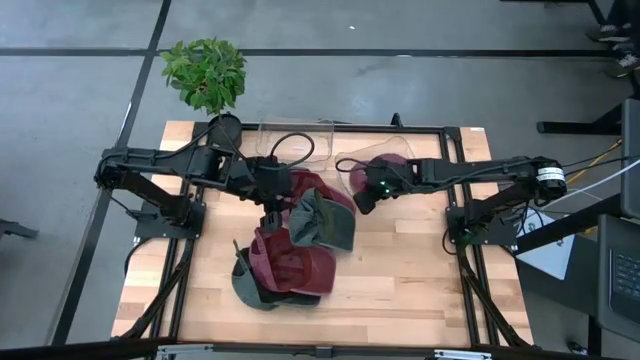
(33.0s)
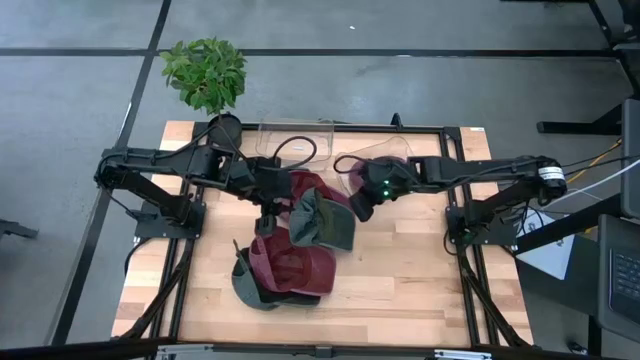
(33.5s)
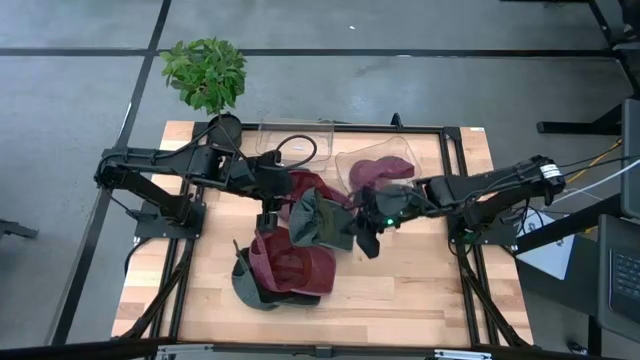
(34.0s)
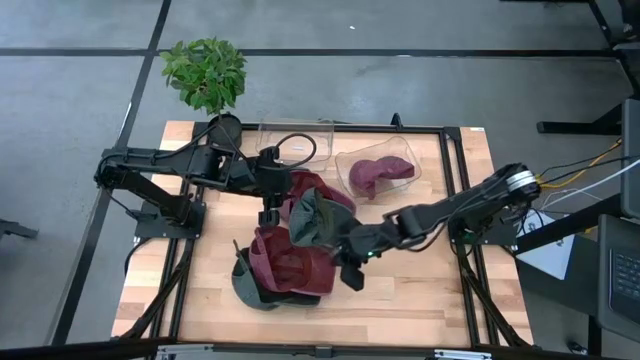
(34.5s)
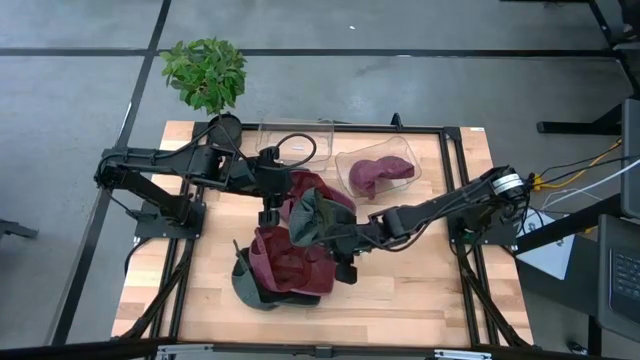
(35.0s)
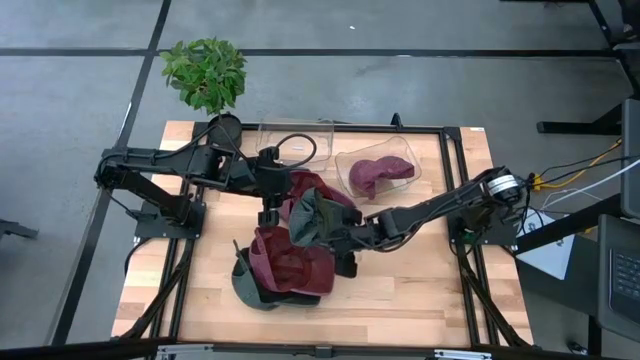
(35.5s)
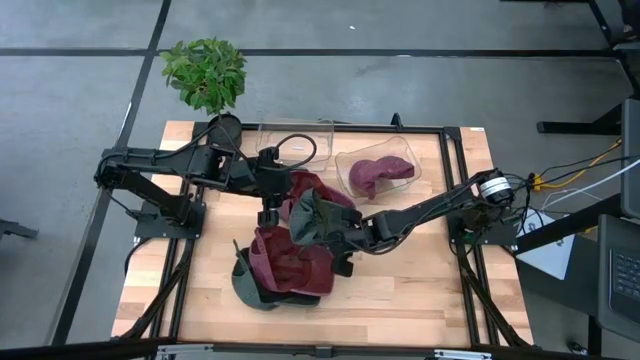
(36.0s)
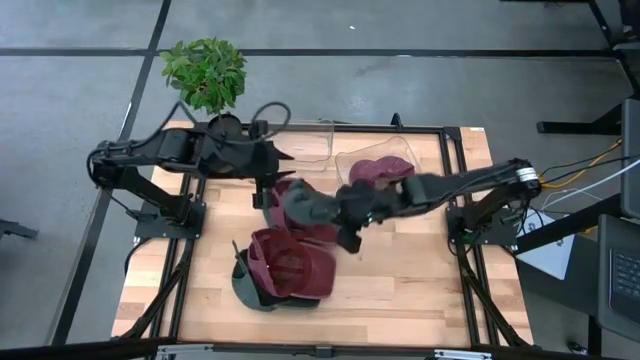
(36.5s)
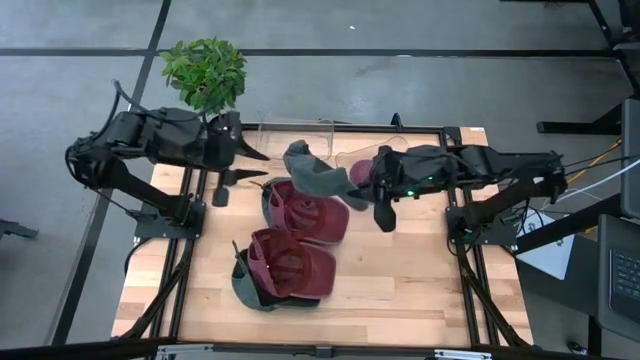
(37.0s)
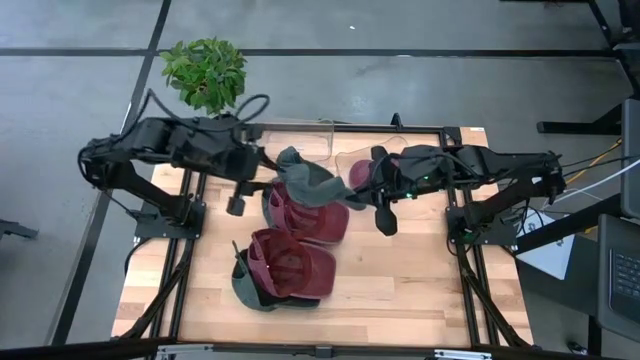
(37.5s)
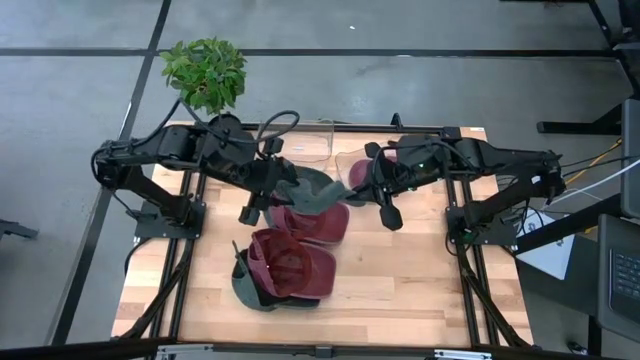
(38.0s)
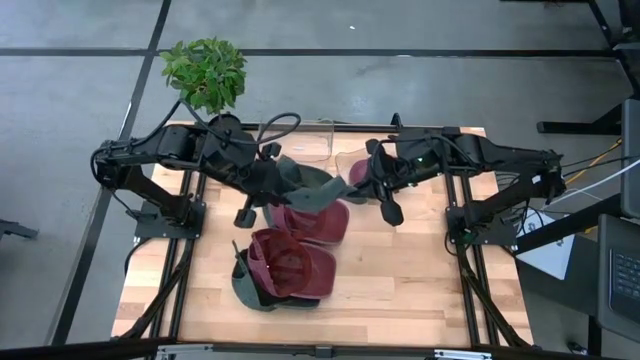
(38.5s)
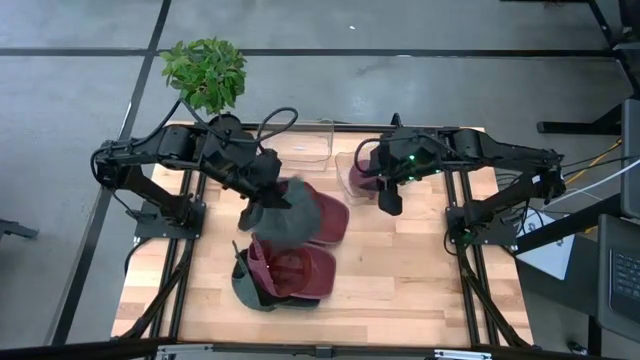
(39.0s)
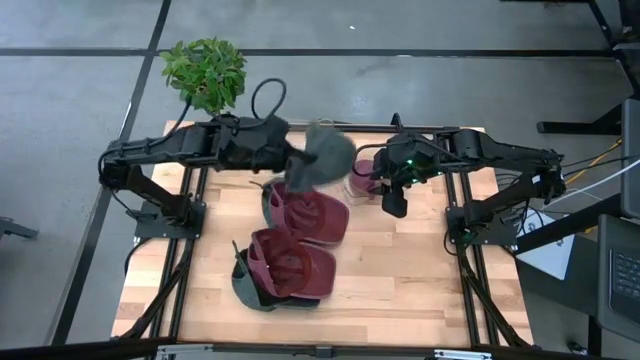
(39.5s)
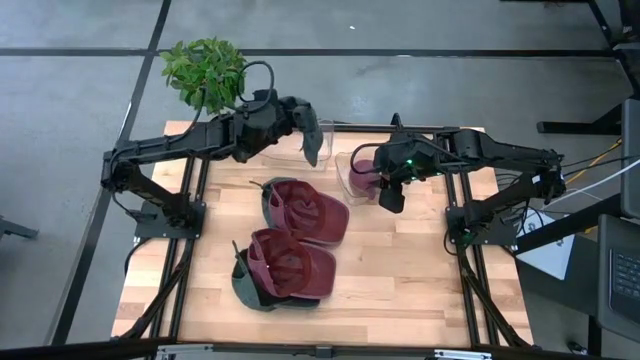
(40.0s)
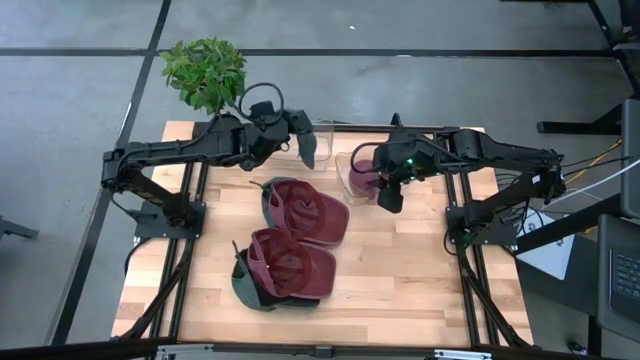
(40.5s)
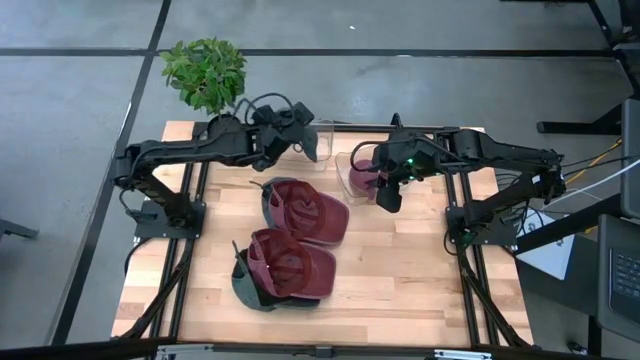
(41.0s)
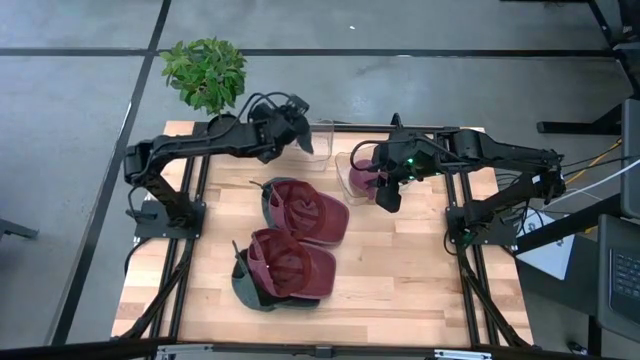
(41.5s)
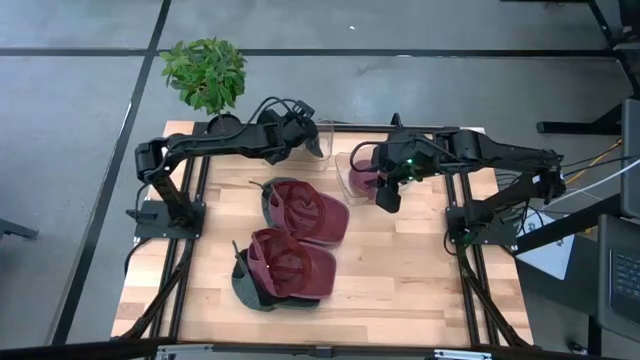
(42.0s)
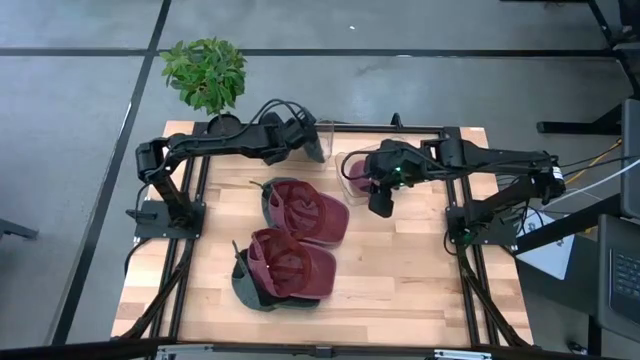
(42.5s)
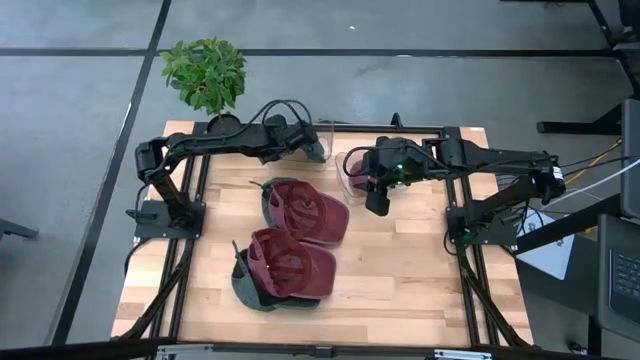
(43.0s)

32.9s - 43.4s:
Task: Pick & Place hat
Put the middle black cap into the left transparent bin

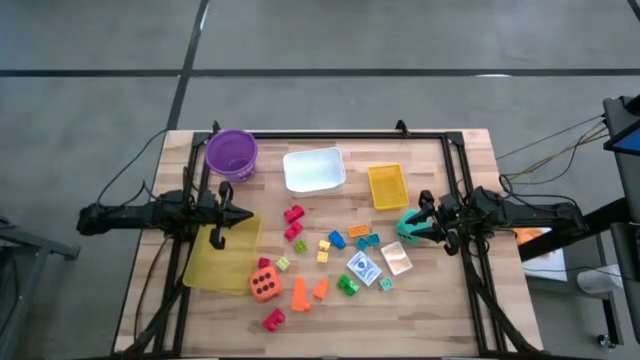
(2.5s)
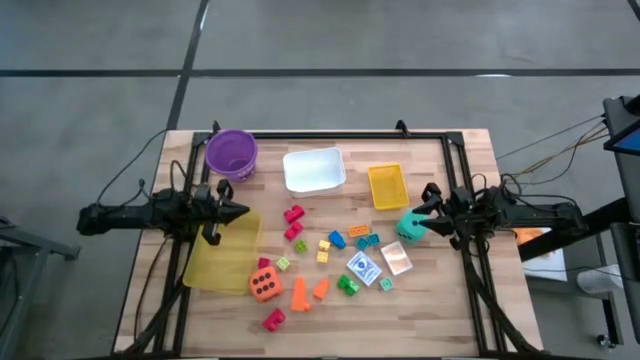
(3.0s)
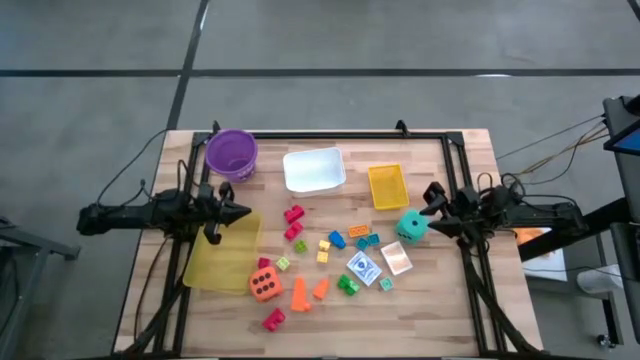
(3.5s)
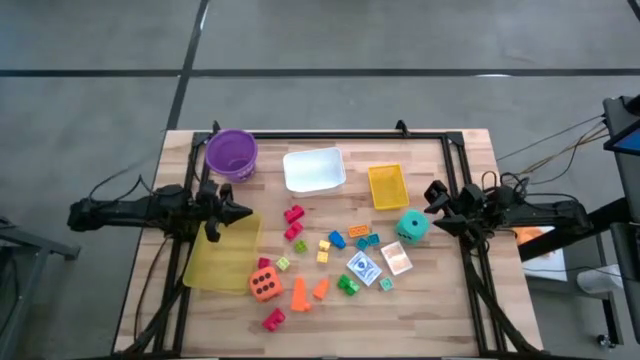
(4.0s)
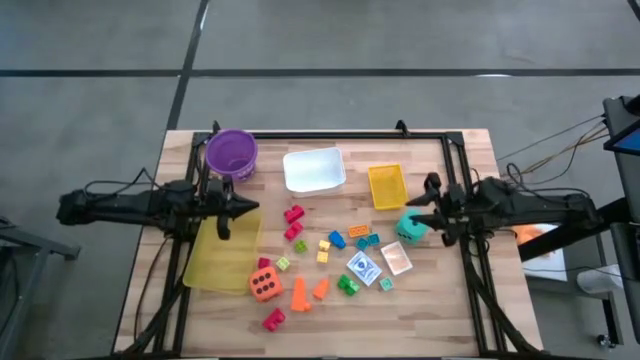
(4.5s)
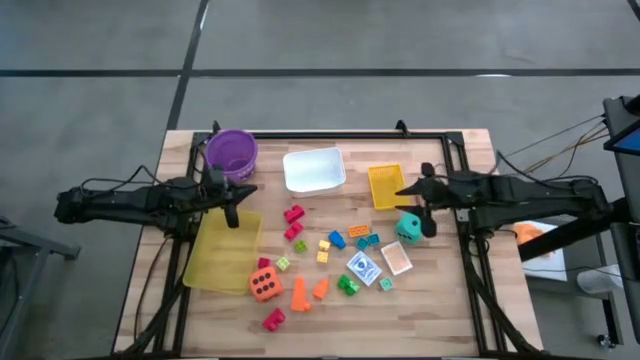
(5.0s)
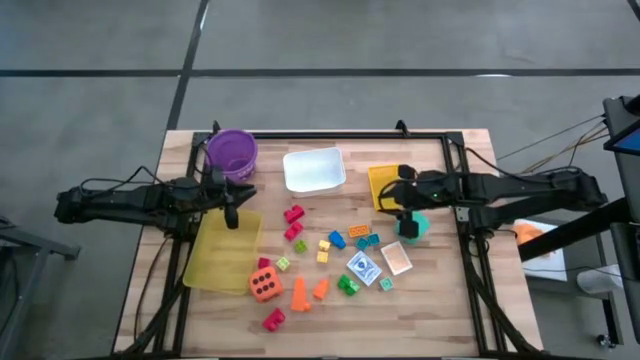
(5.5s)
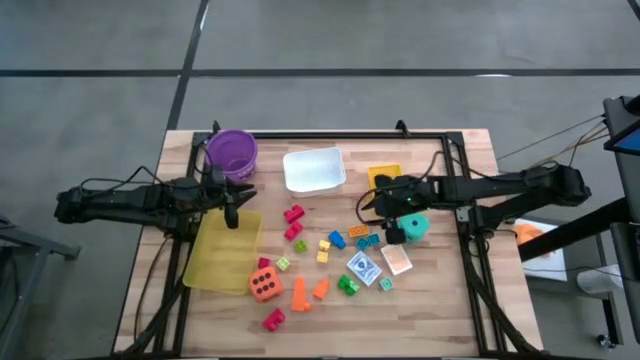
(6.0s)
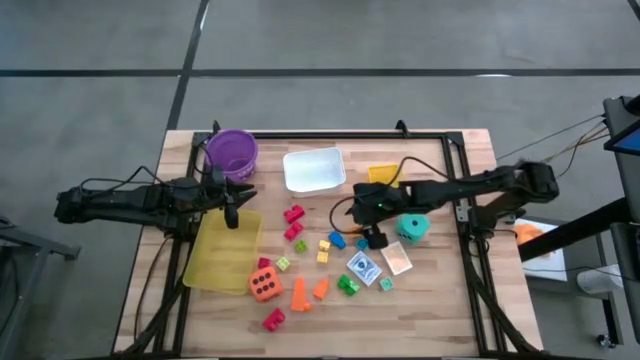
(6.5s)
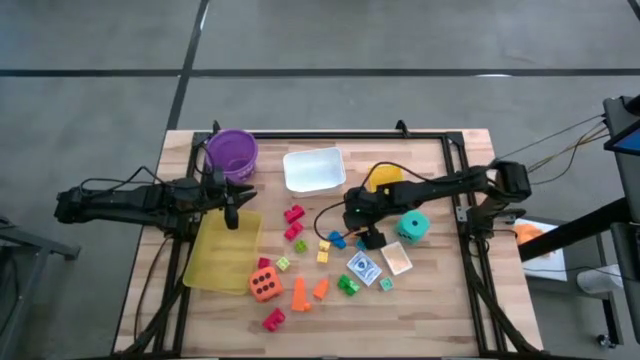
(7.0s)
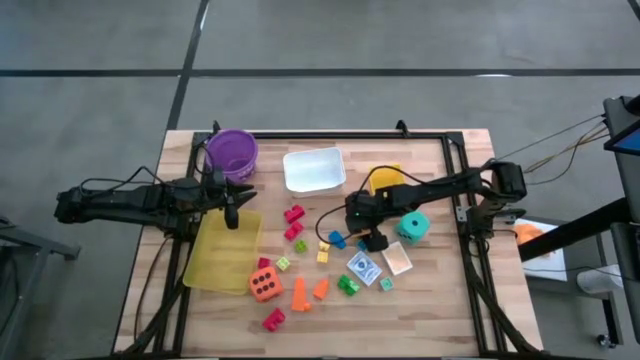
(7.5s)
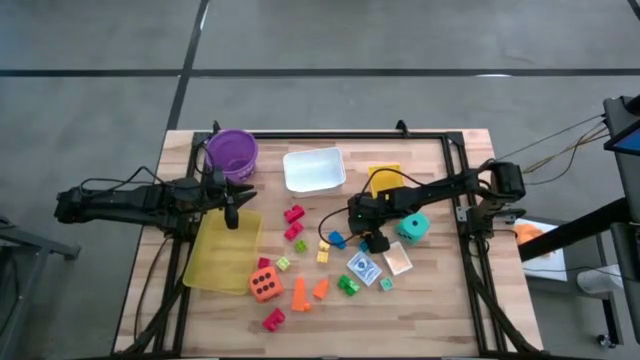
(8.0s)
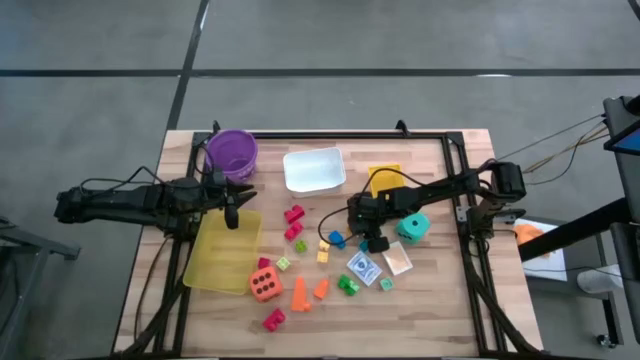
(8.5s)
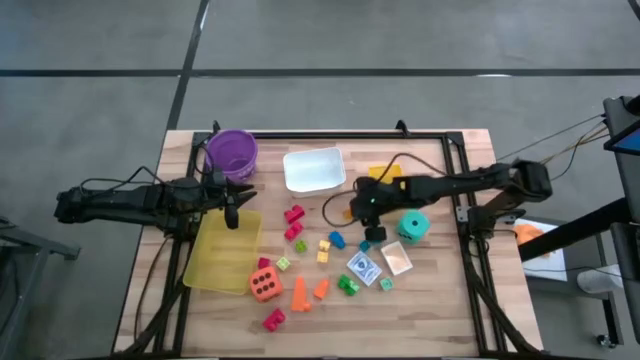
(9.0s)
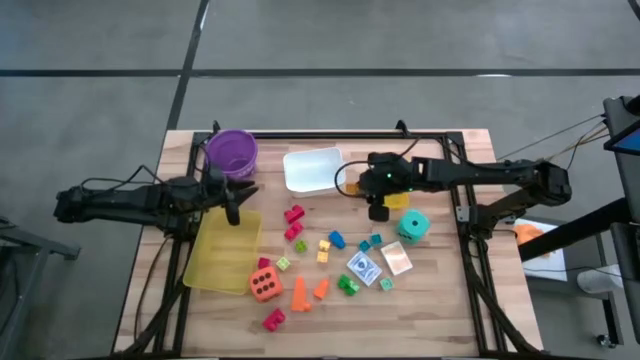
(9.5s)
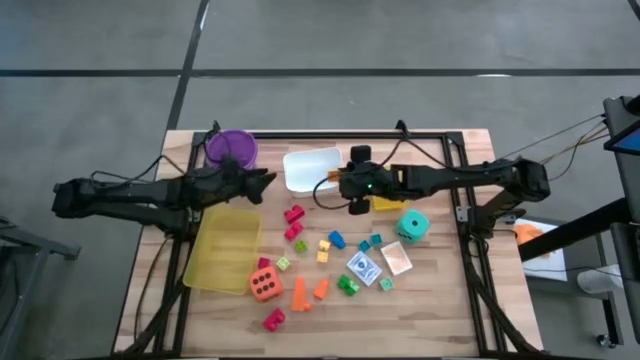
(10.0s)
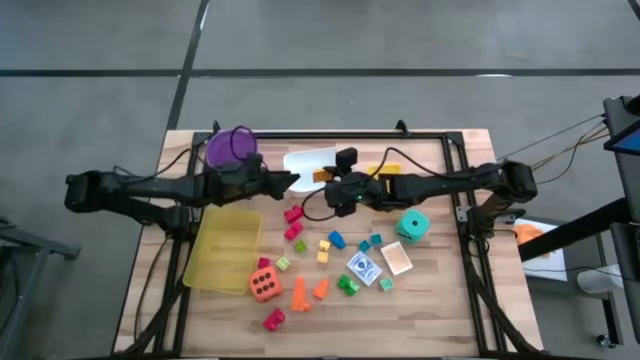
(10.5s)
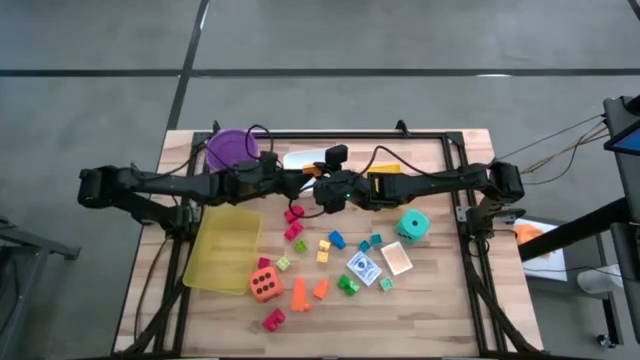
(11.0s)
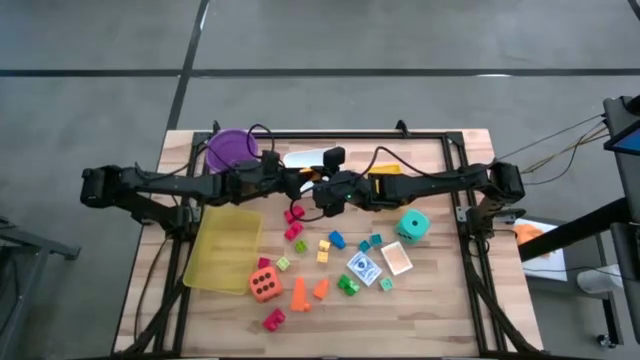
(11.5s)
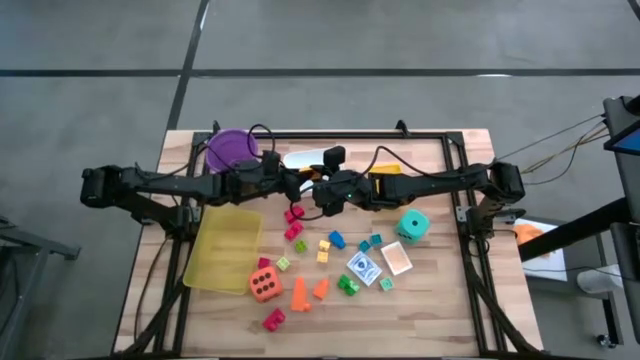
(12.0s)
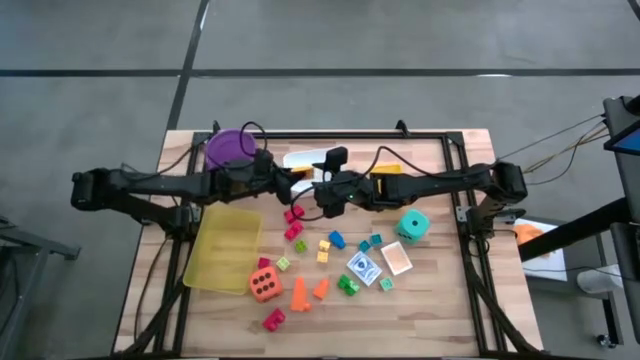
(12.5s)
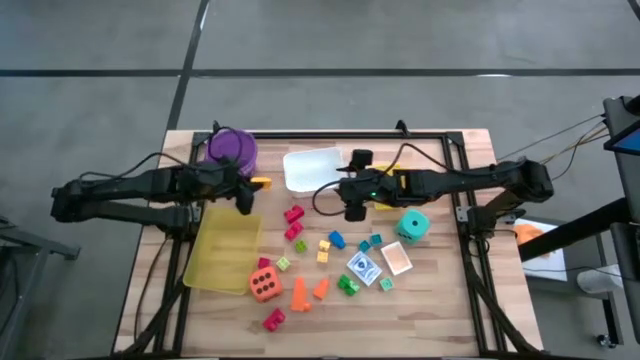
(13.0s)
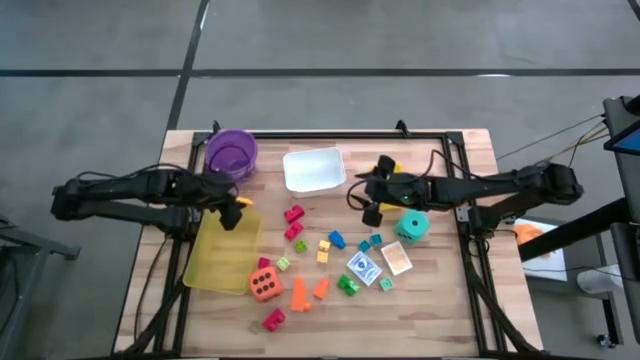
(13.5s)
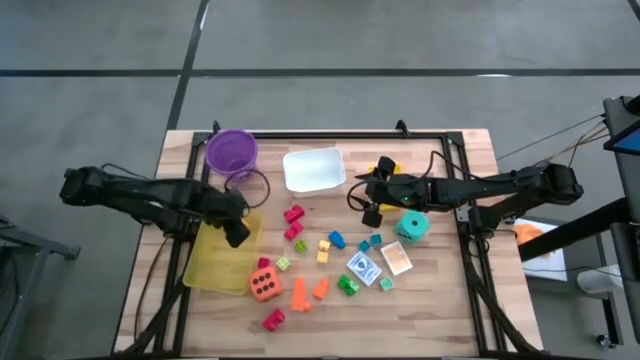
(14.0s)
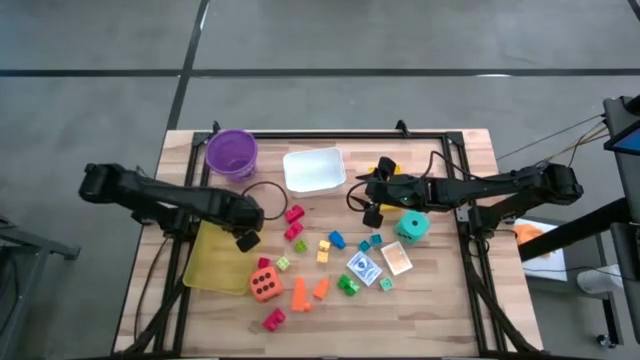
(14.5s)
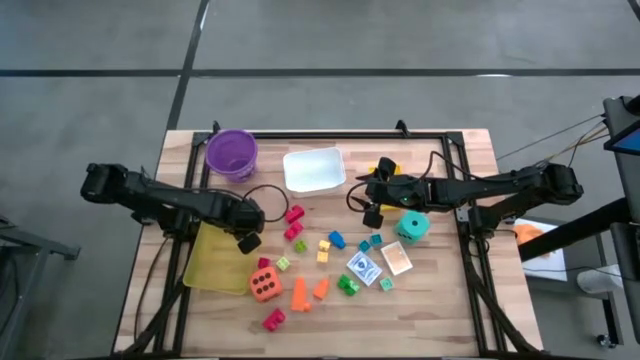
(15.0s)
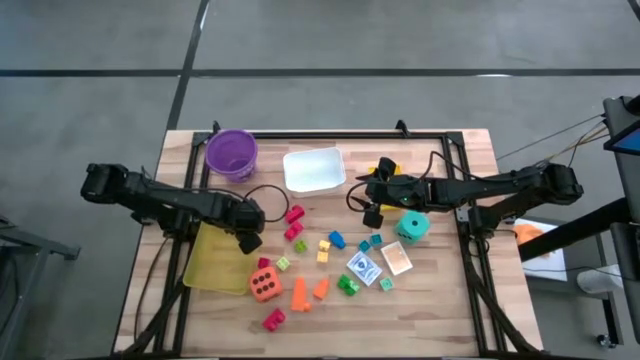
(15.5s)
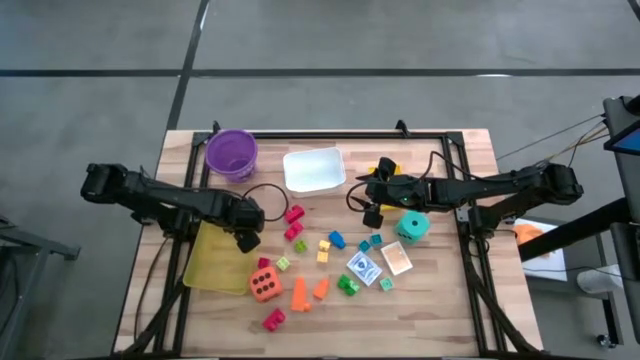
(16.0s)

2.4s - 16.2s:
Task: Pick & Place Toys
Put the yellow game piece into the light yellow bin
